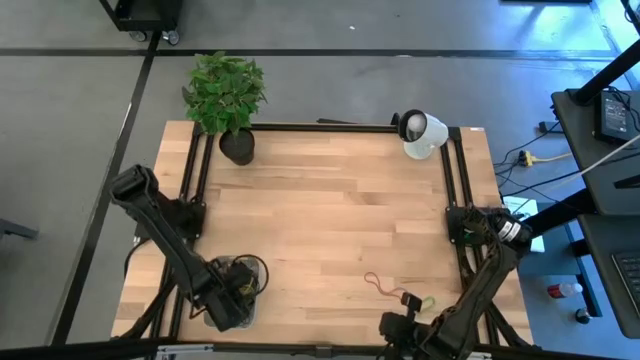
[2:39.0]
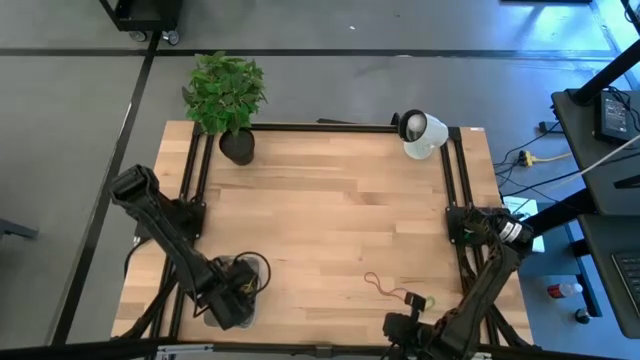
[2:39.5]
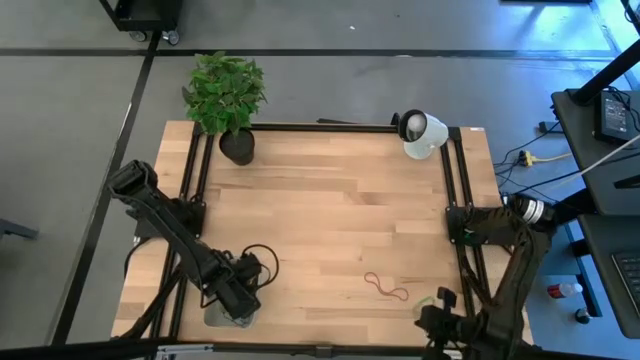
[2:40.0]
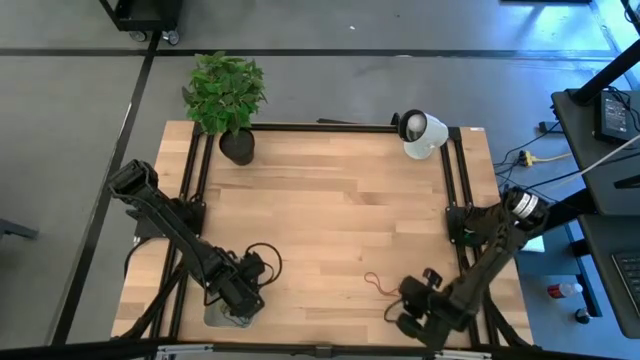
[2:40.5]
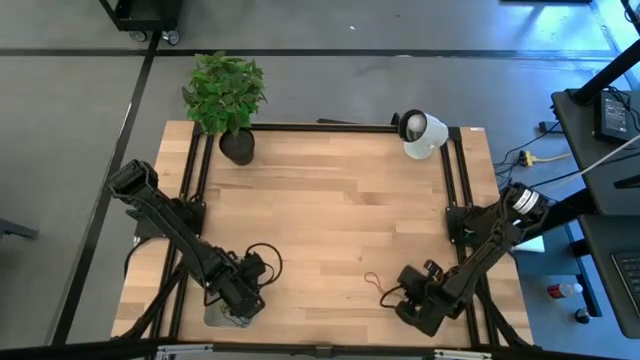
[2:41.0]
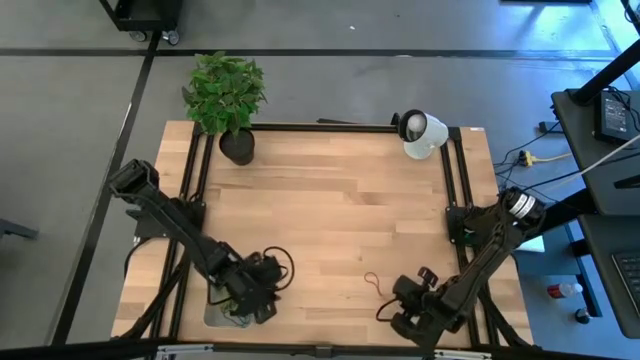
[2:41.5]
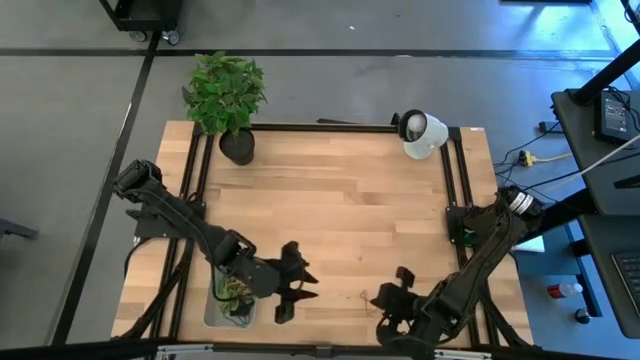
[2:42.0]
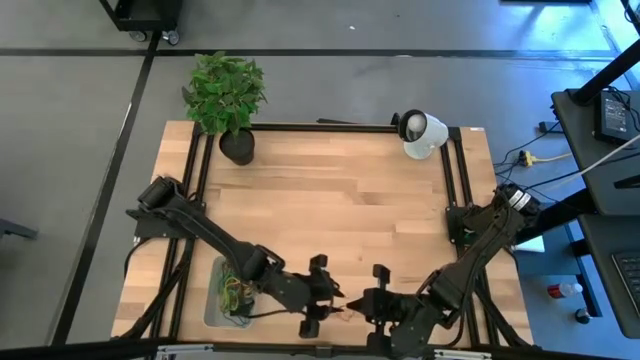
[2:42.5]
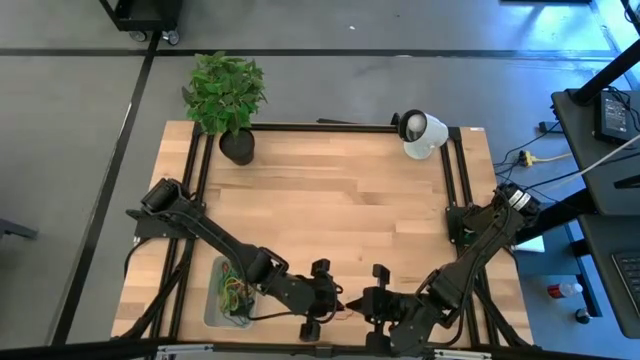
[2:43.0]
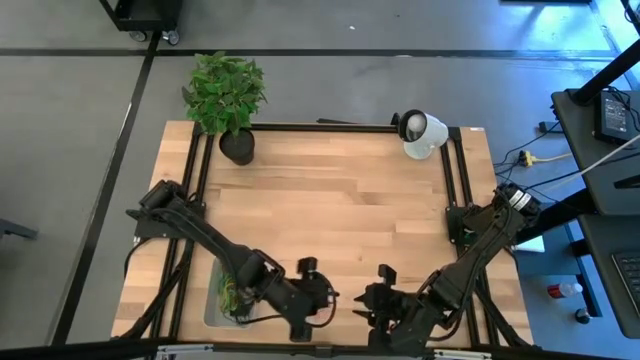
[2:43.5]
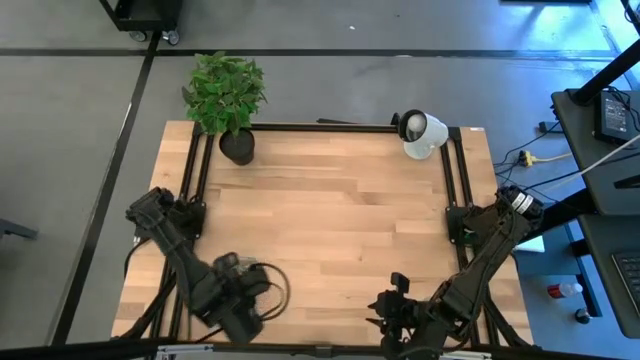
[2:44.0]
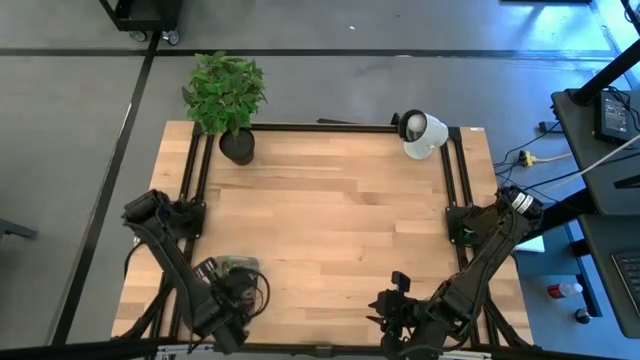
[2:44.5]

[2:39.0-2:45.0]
Task: Pick and place rubber bands into bin
Put the red rubber band into the bin

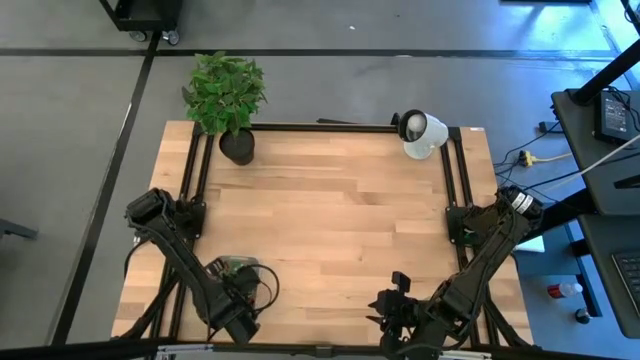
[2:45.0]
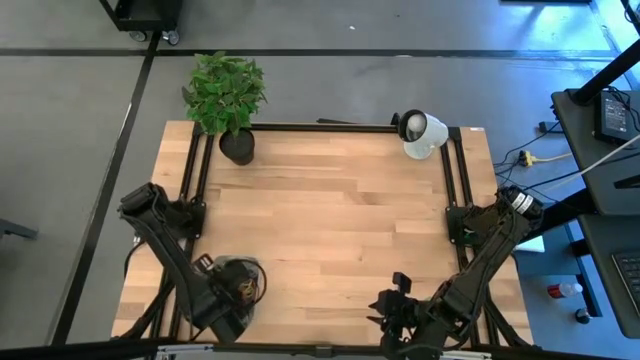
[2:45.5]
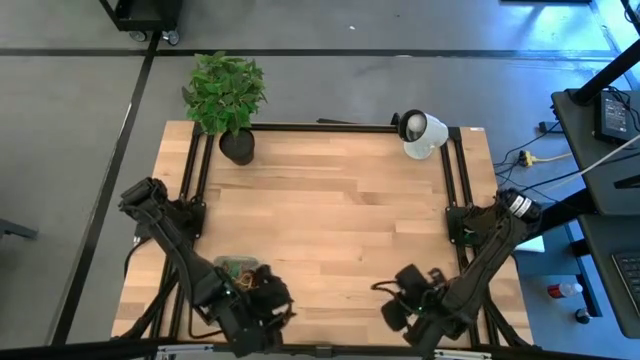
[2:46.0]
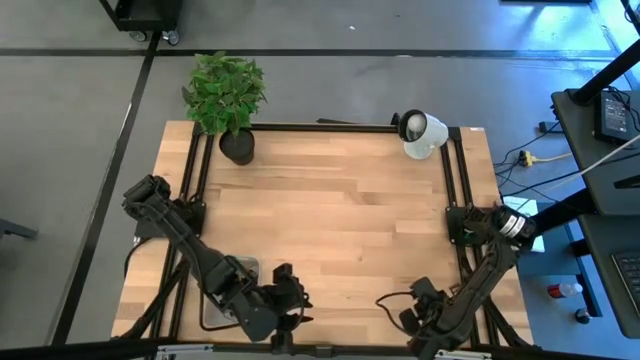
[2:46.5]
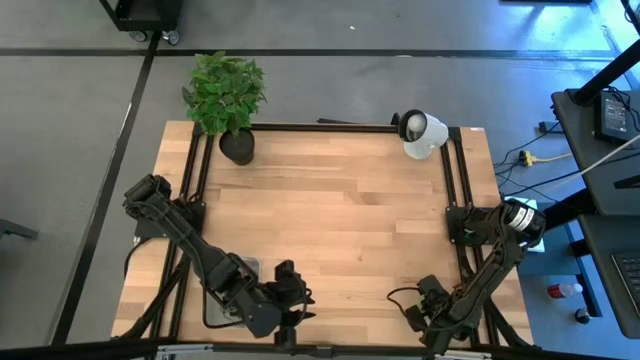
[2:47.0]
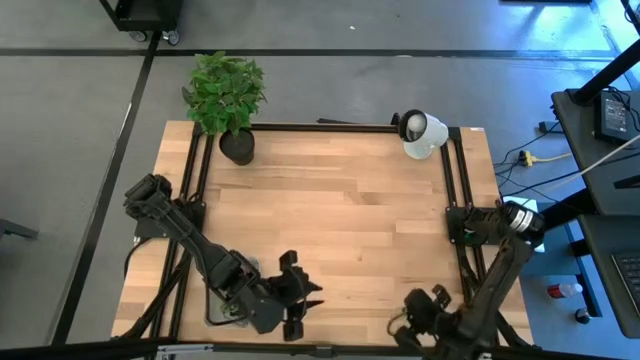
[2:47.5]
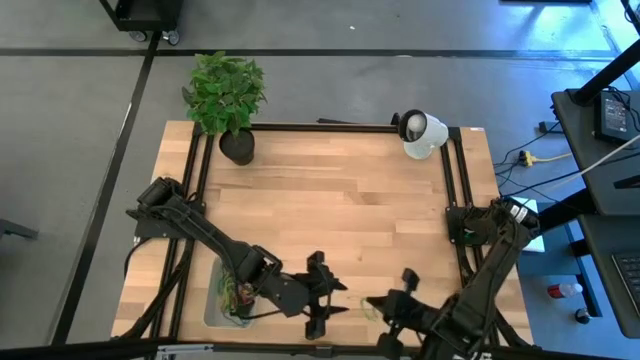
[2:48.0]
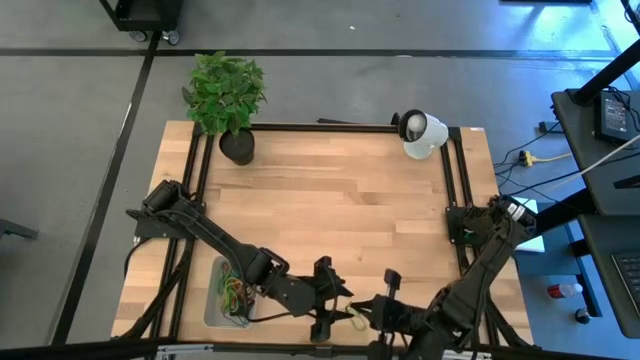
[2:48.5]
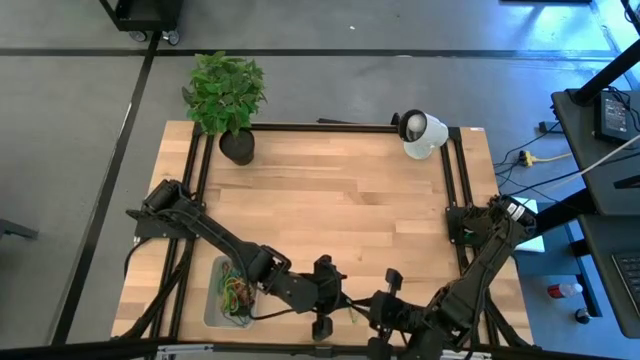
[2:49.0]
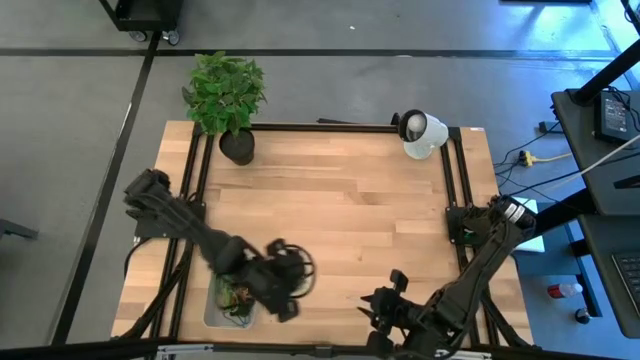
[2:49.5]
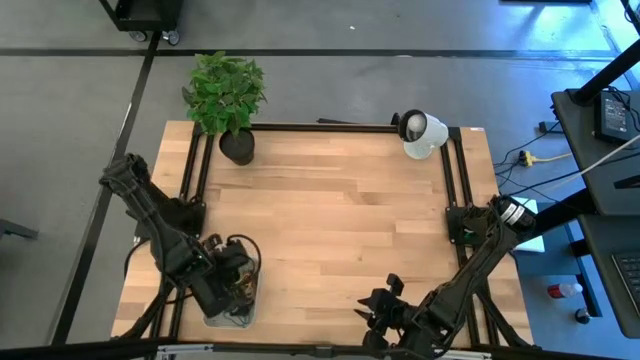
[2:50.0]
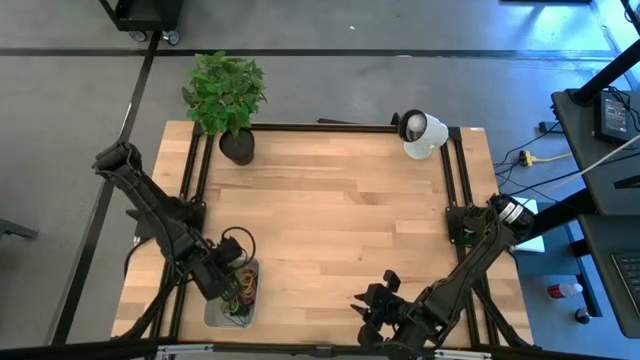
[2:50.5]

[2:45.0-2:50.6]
Put the green rubber band into the bin

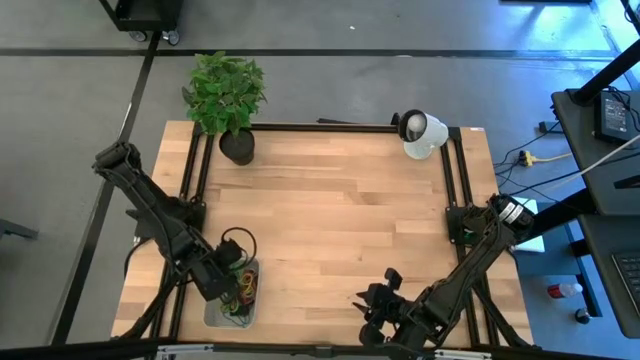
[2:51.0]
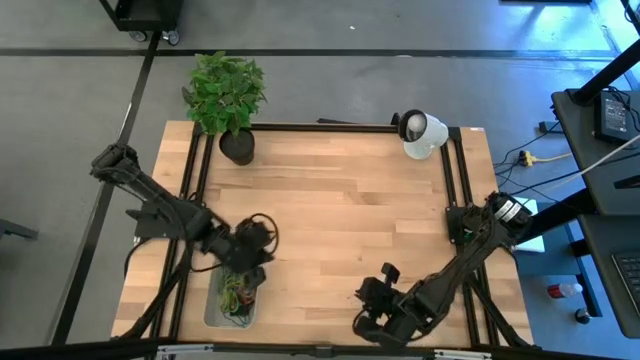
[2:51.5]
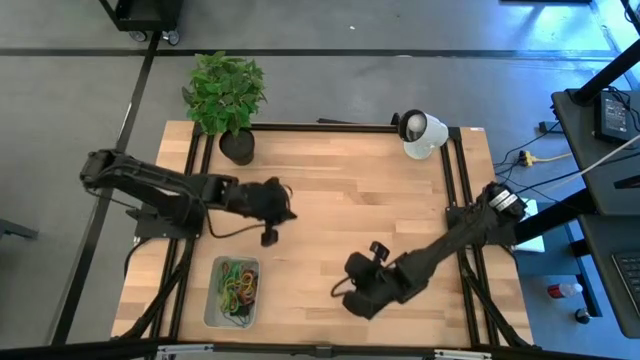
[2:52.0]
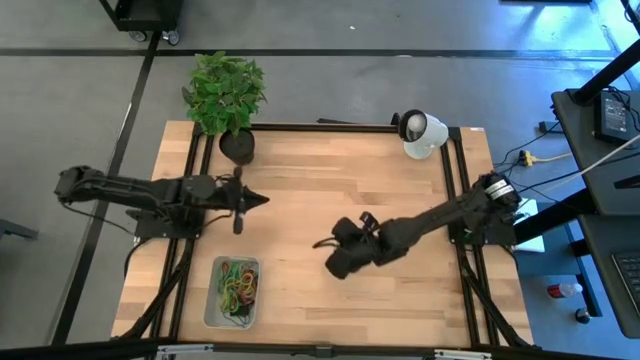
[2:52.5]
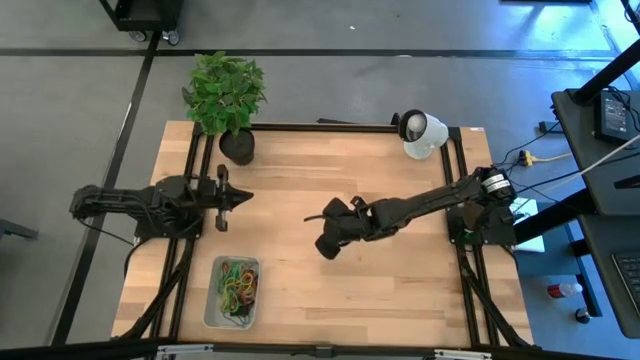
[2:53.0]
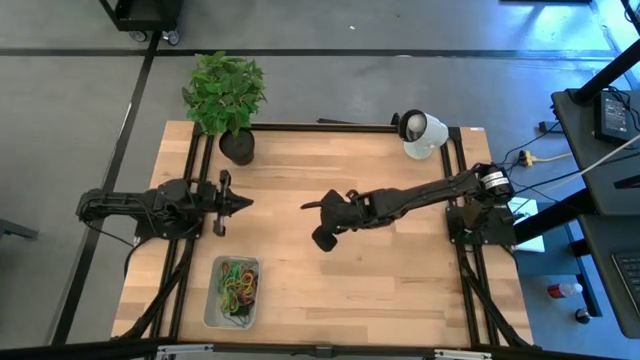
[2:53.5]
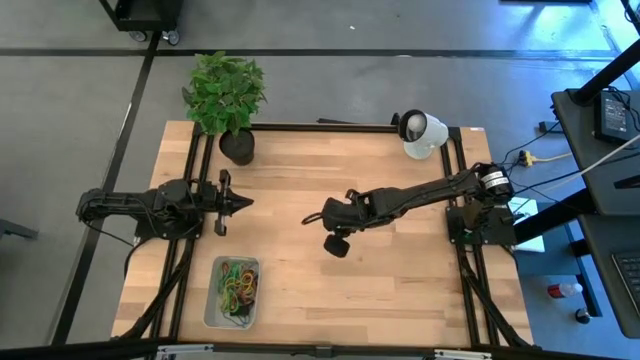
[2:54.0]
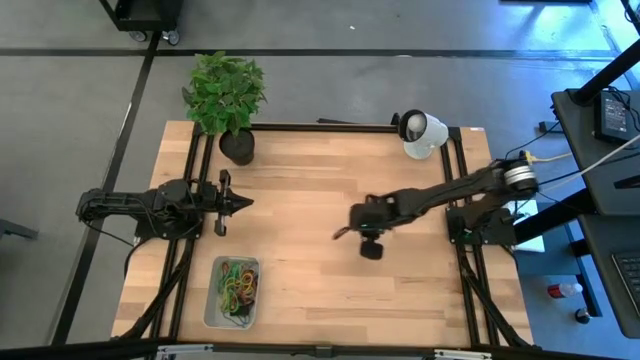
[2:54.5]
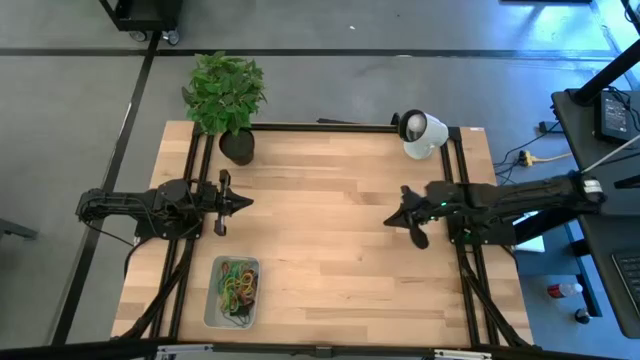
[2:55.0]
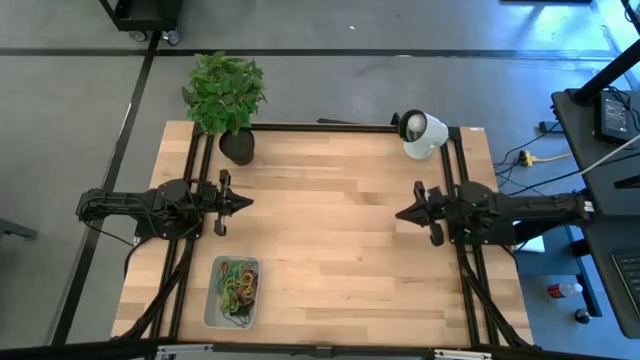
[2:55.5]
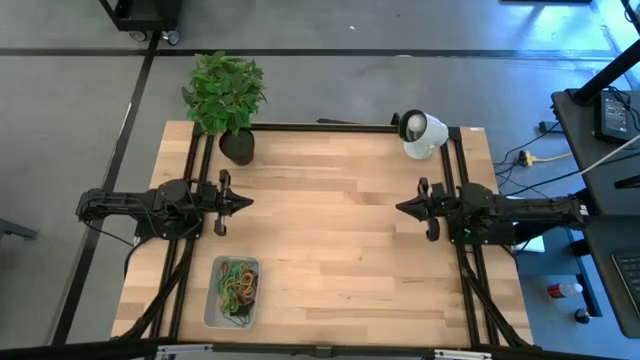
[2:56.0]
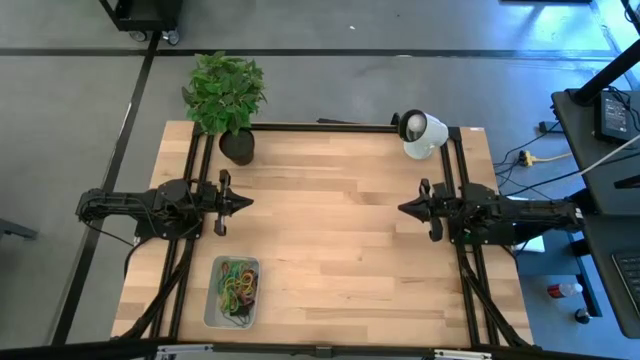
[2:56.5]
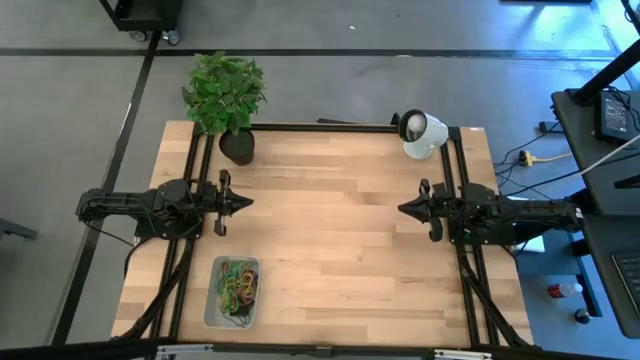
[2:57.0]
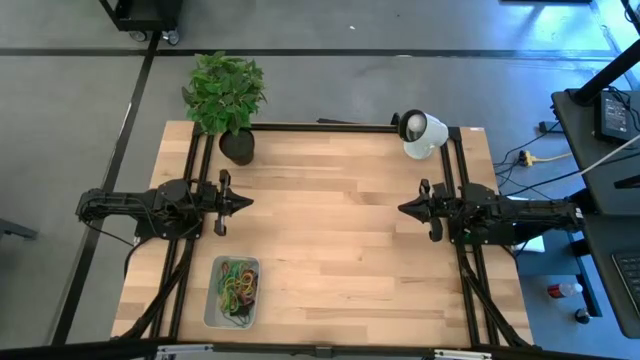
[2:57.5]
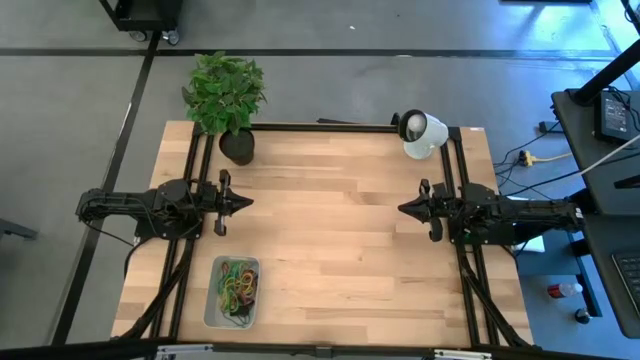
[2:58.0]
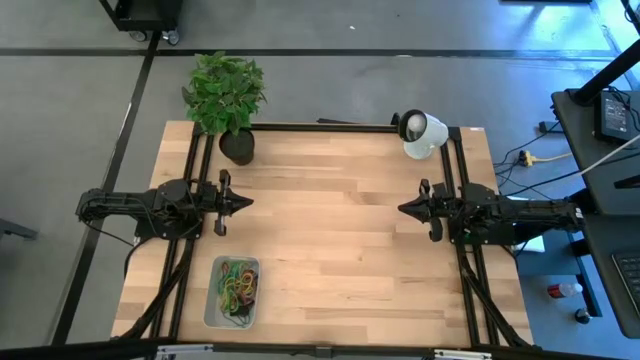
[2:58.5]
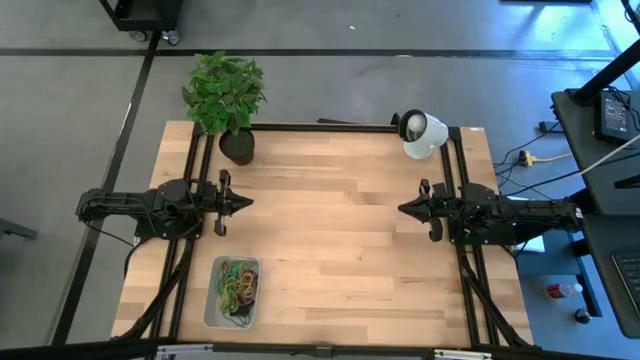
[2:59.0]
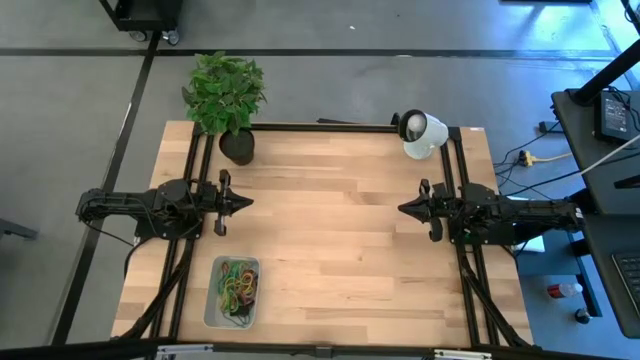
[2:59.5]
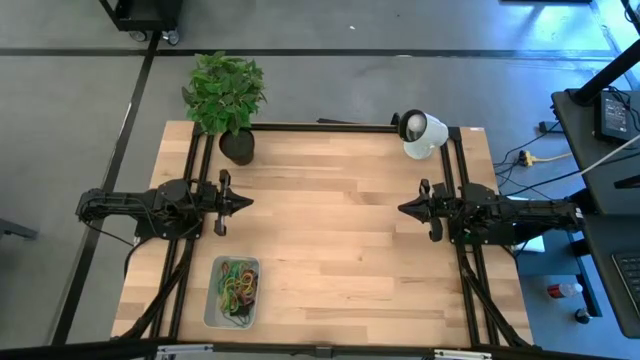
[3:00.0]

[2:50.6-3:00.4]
Return to Home Position
